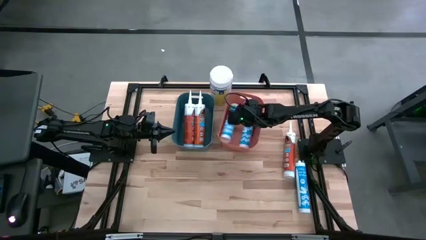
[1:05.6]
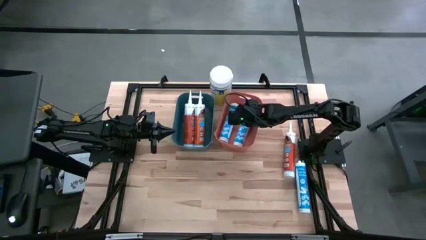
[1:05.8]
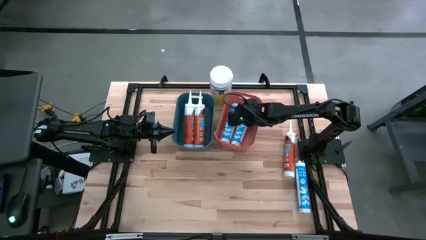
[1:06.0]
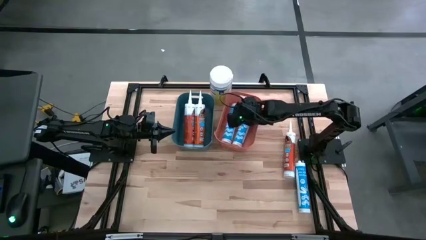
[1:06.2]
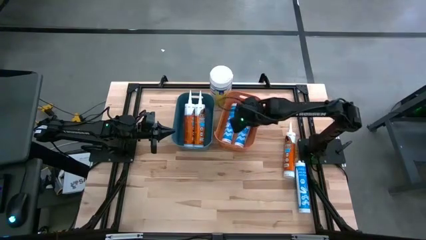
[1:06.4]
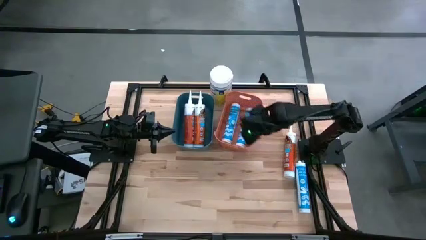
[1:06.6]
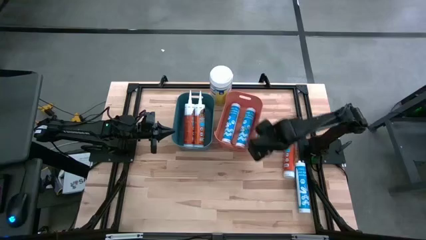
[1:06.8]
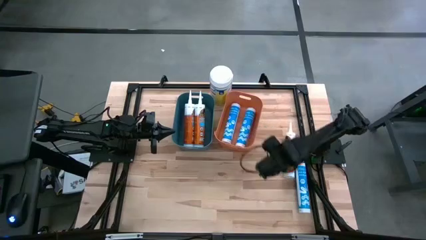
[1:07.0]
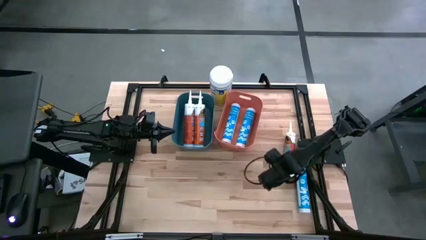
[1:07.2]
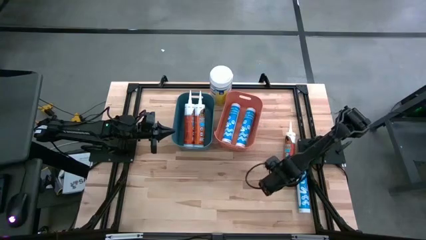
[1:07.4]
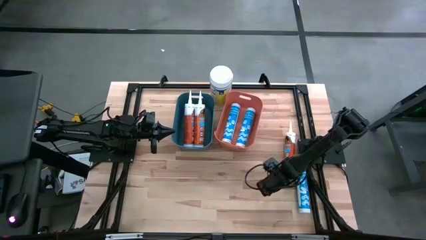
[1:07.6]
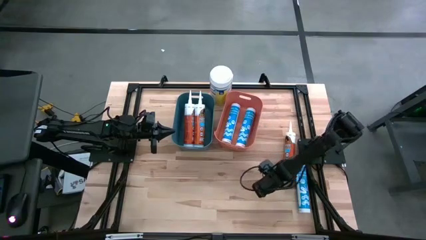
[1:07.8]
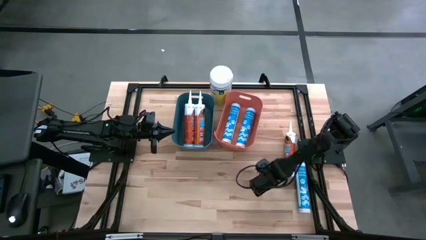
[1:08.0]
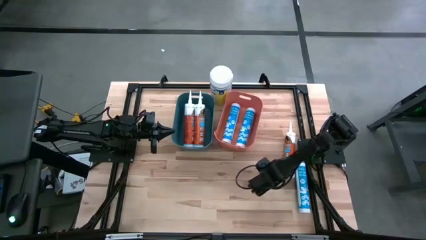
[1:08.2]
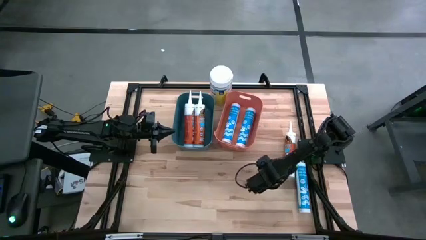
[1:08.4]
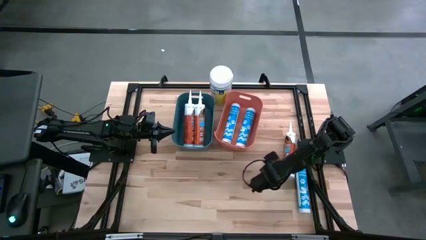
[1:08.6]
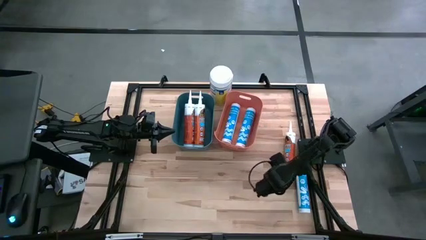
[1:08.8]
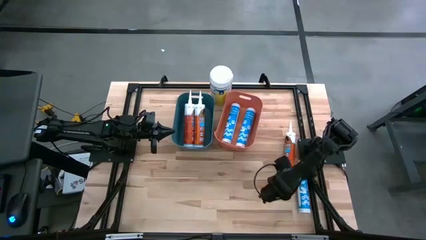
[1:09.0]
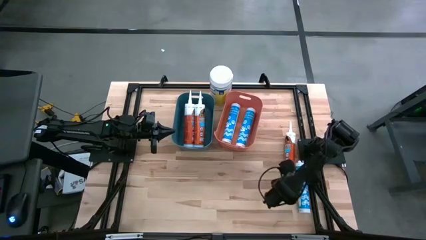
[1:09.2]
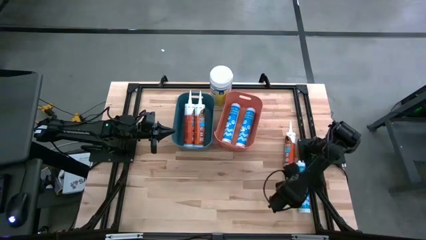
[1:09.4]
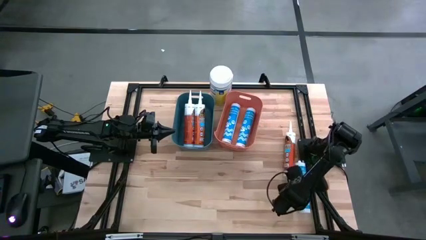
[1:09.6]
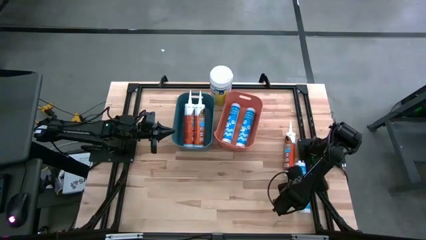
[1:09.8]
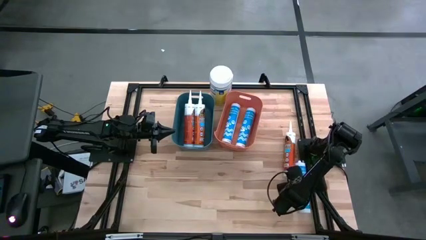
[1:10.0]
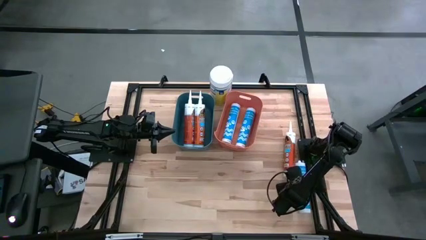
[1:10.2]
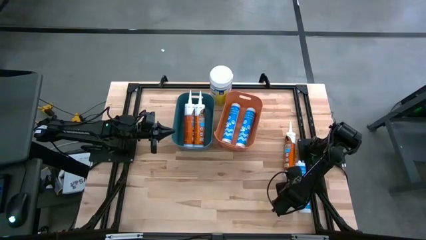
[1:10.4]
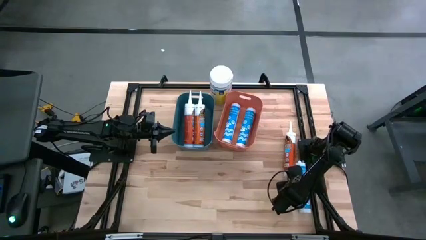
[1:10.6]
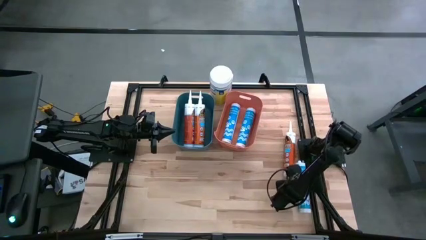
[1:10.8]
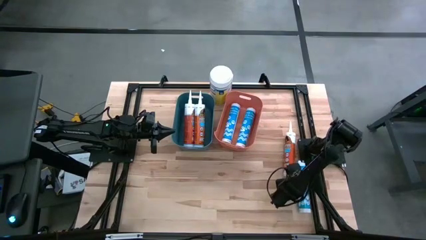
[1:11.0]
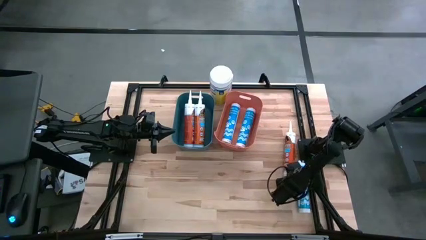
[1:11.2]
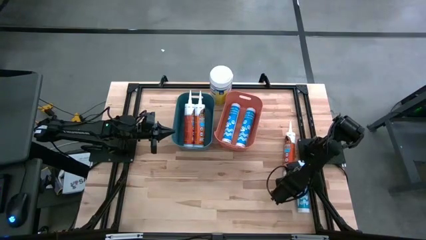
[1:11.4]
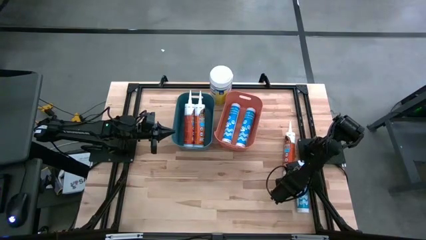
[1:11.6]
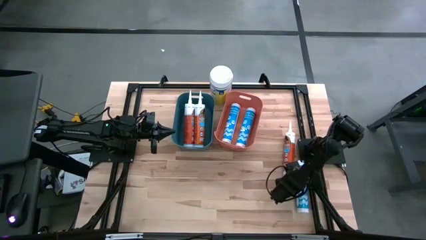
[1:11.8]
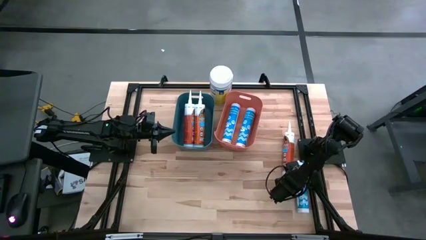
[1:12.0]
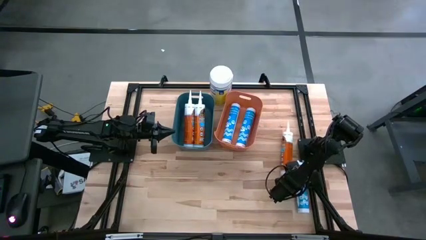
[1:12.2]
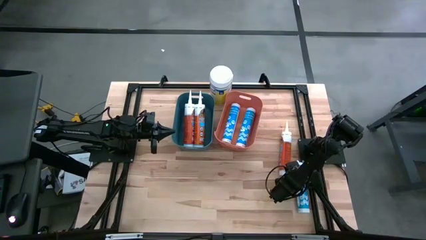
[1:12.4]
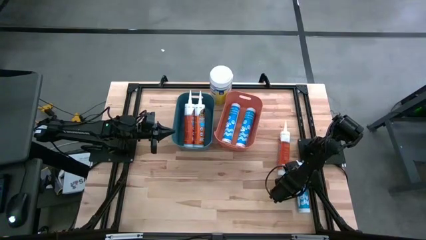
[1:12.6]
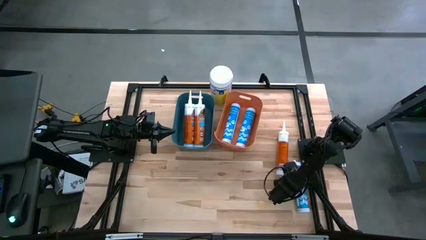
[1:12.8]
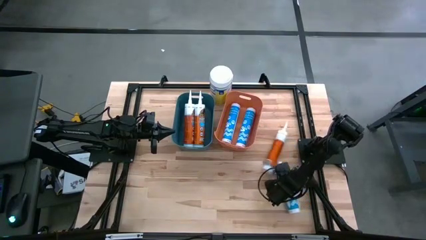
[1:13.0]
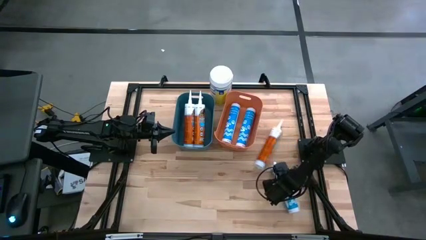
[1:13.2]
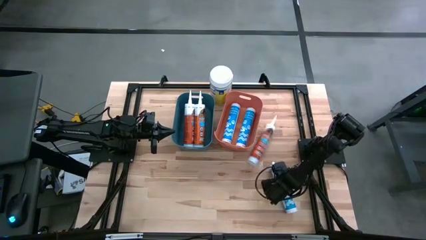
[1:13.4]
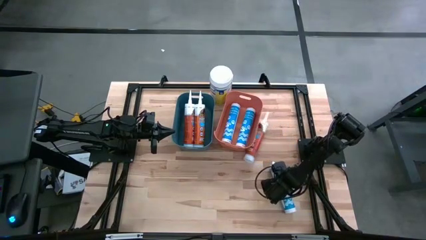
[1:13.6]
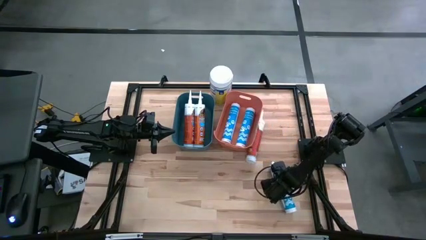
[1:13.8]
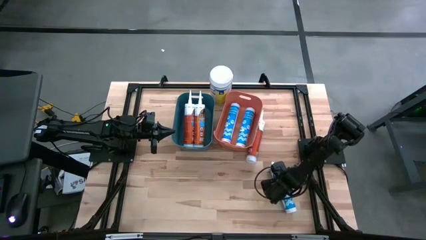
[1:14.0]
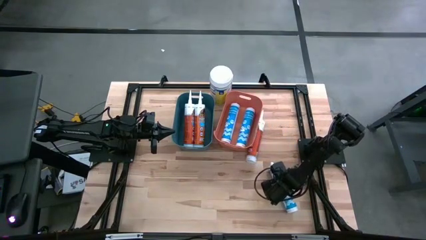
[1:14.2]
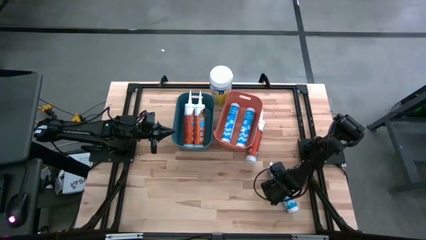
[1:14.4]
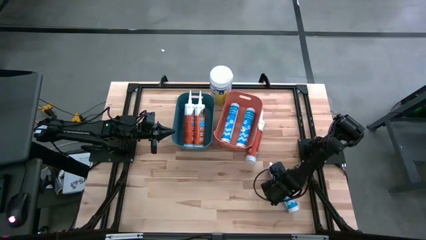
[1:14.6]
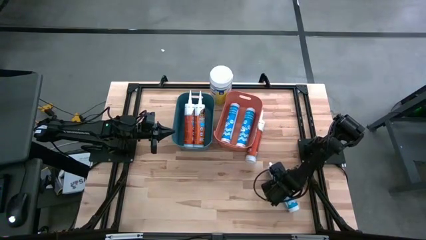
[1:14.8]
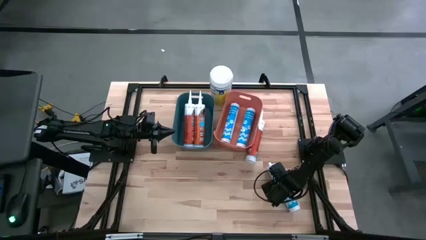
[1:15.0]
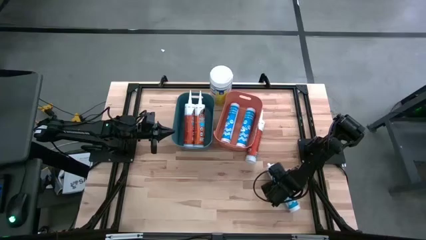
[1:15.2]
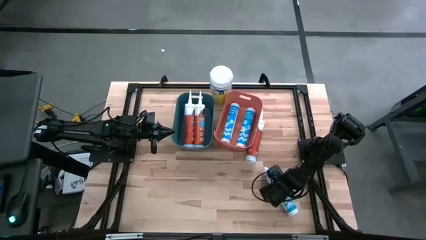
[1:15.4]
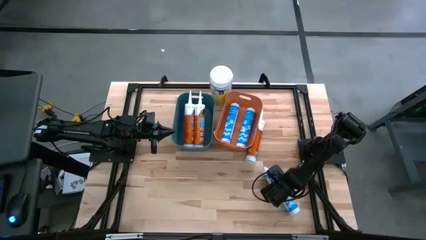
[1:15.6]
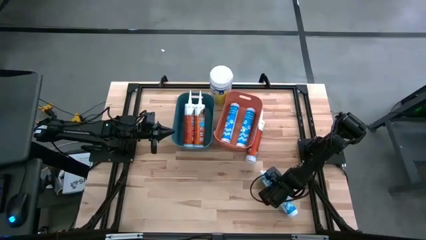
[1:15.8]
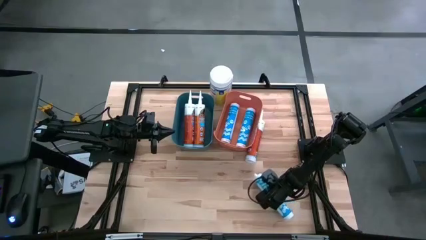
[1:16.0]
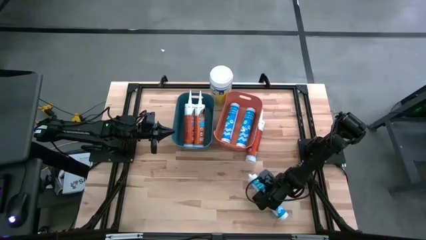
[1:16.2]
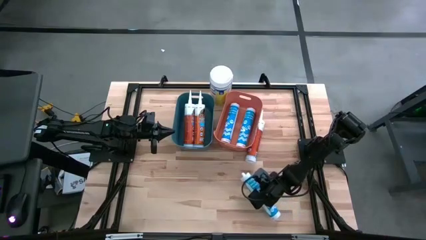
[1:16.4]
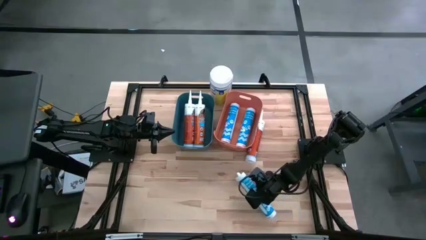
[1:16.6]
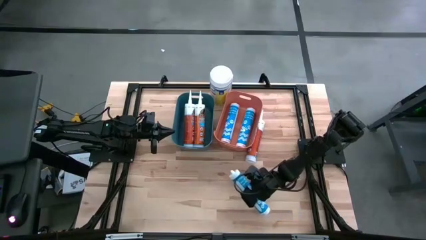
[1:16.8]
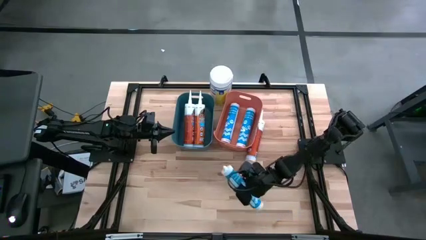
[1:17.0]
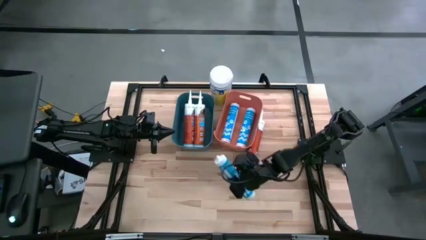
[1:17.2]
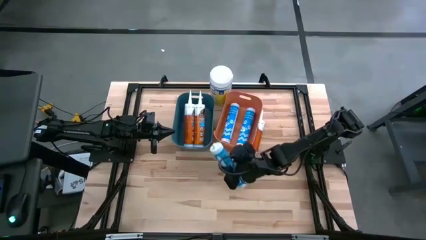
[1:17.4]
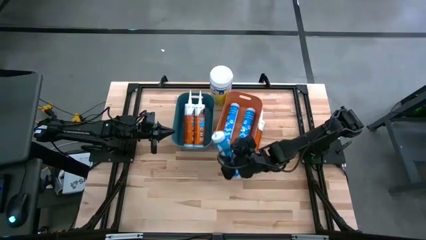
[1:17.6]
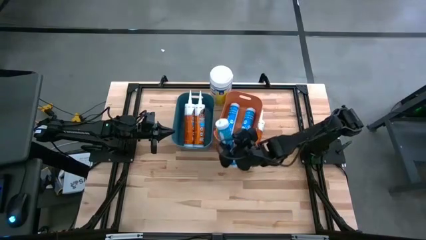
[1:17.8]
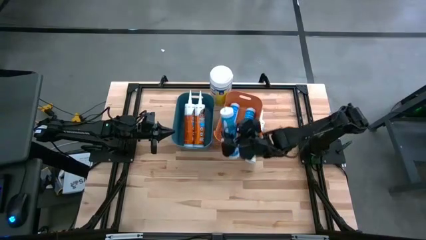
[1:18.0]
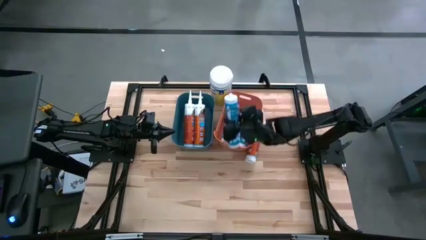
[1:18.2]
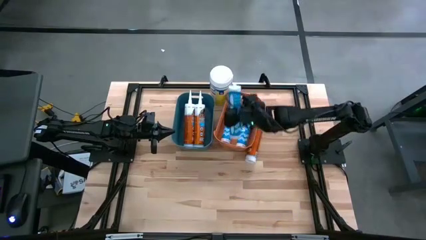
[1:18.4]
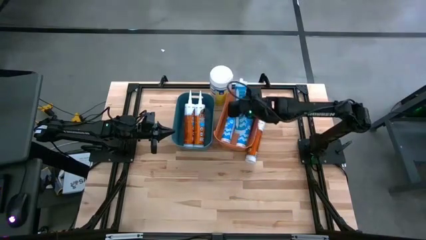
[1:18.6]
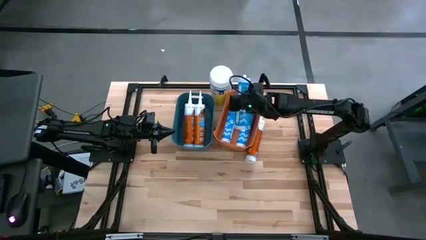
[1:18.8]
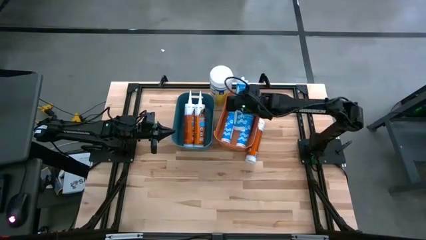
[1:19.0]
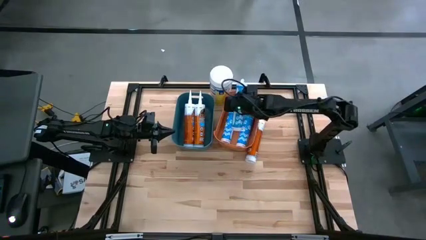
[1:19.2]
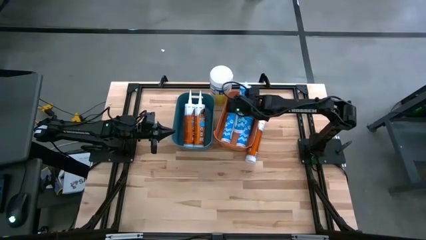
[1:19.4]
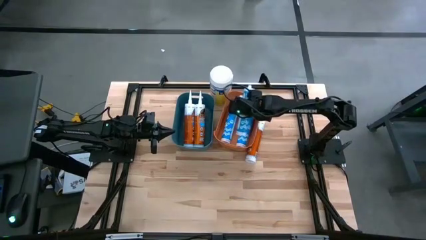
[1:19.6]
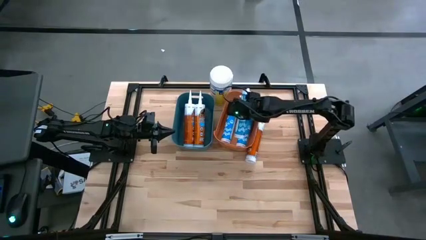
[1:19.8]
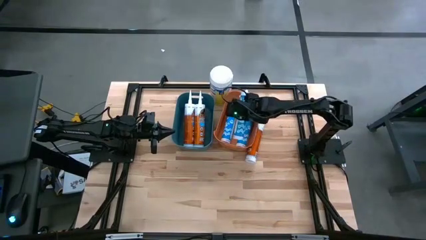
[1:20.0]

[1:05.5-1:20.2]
Task: Pick & place silicon tubes, Sealant and Lysol wipes
Put the blue sealant into the orange bin

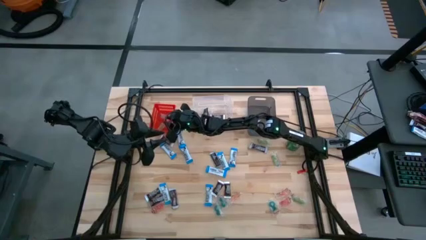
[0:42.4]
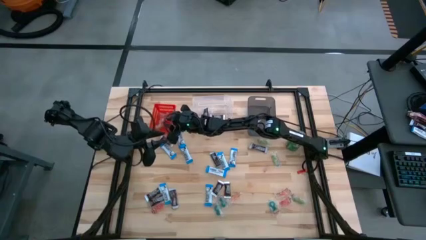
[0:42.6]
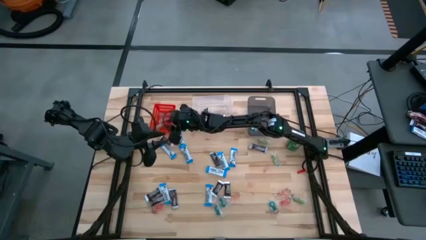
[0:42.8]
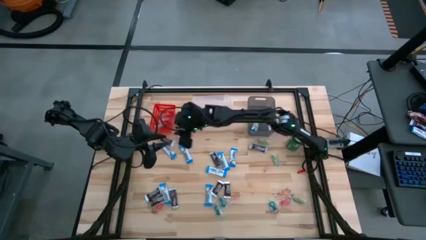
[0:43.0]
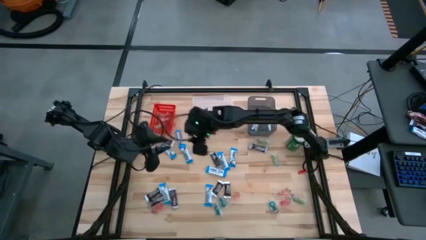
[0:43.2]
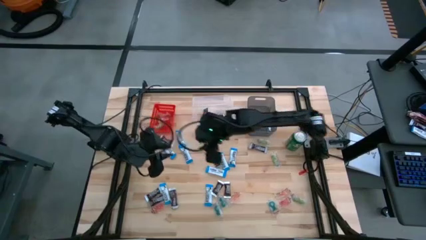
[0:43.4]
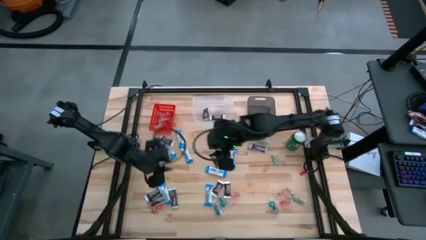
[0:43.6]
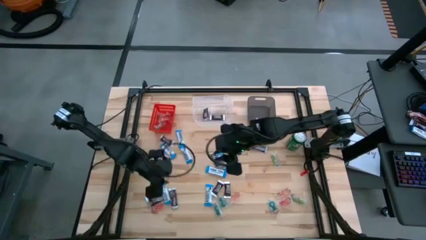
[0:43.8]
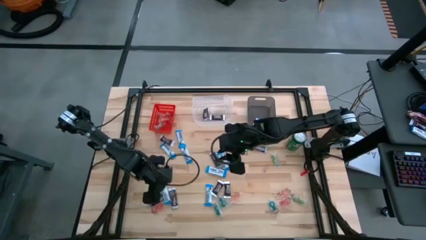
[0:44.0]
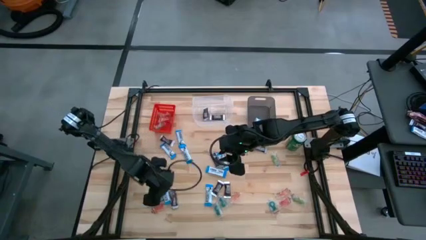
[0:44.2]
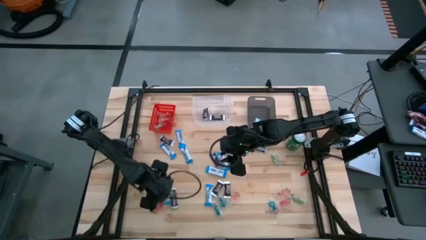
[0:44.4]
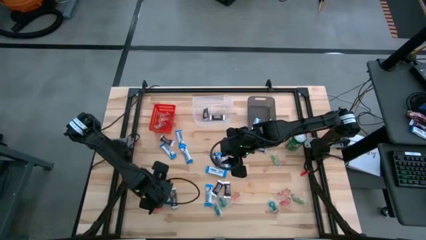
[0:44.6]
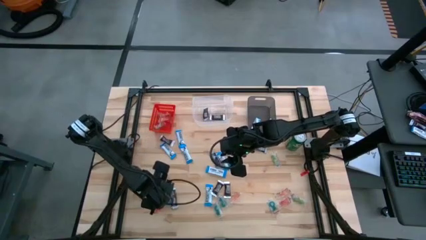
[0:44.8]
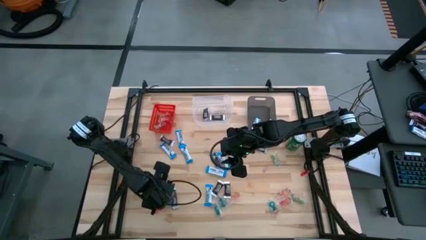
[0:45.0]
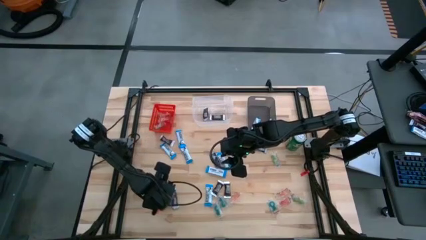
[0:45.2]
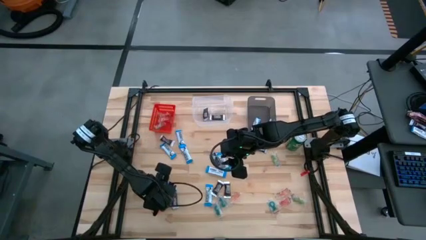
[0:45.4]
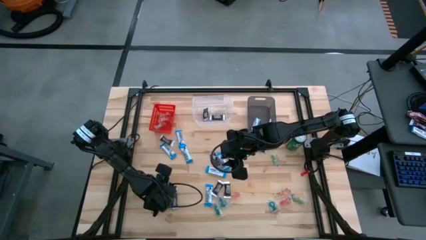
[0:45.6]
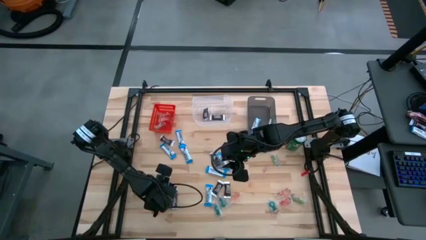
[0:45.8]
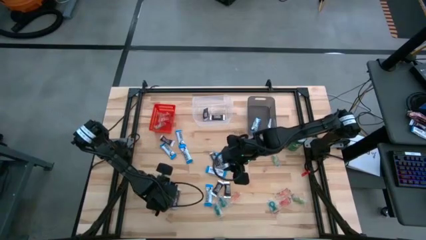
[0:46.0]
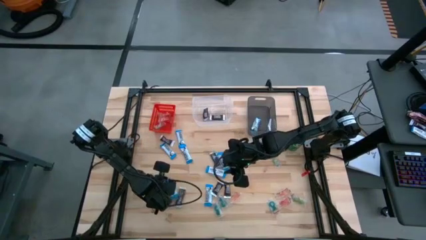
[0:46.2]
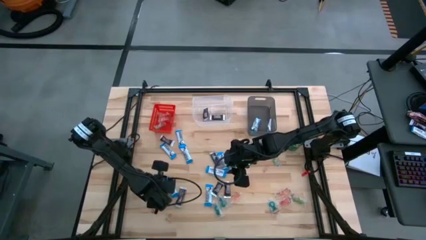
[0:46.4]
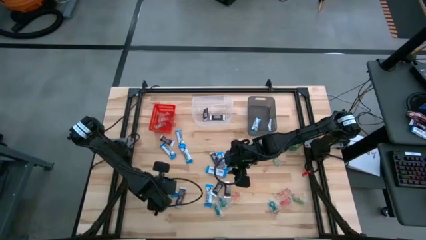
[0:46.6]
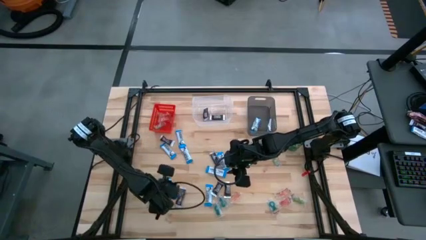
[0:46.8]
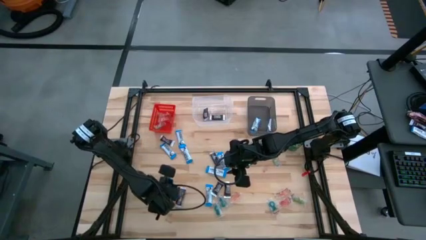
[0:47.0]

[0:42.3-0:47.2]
Task: Sort candy
Put the white chocolate bar into the black bin
